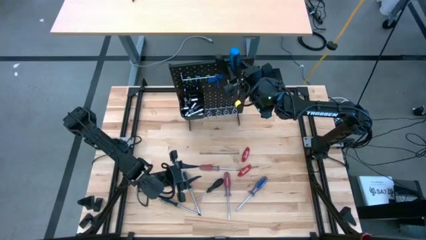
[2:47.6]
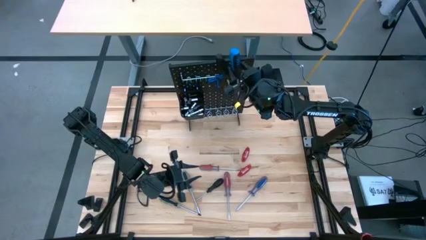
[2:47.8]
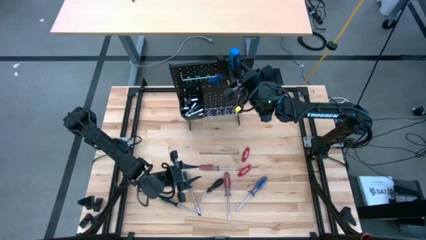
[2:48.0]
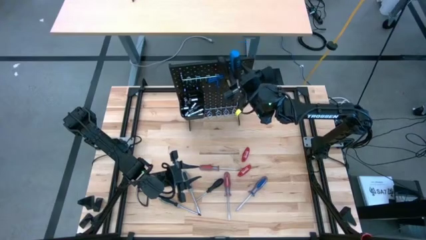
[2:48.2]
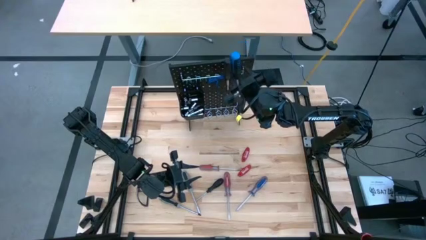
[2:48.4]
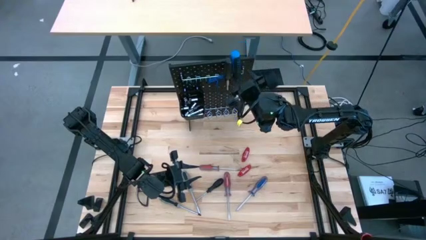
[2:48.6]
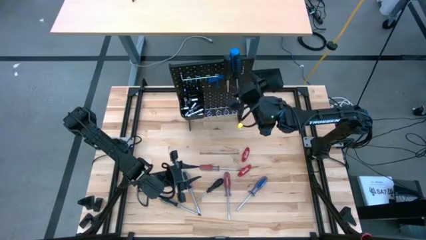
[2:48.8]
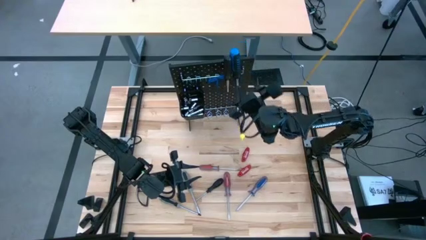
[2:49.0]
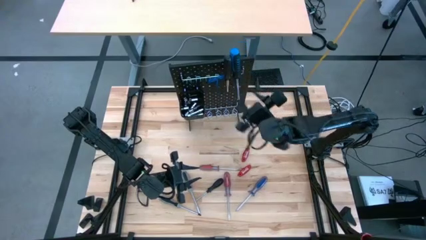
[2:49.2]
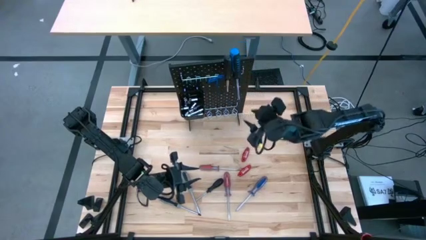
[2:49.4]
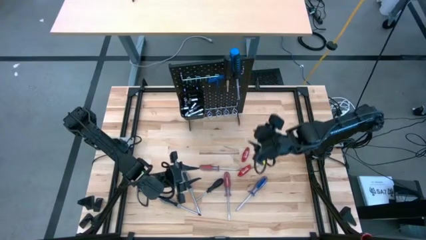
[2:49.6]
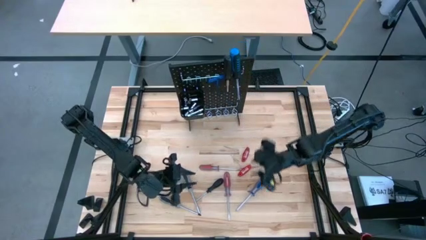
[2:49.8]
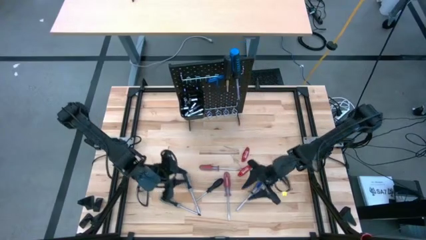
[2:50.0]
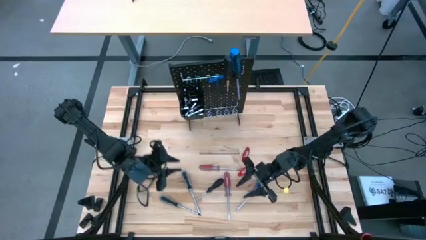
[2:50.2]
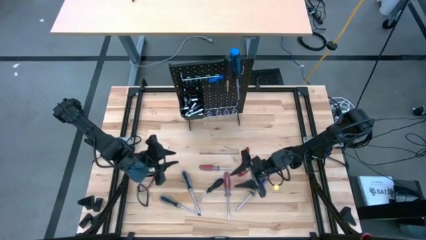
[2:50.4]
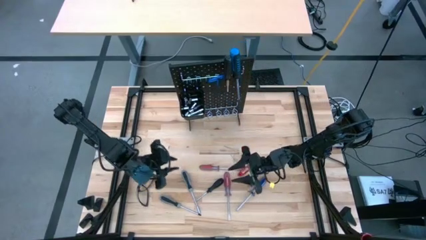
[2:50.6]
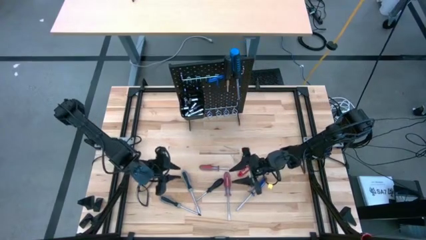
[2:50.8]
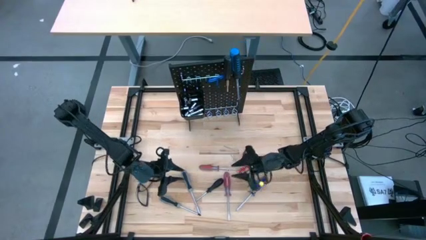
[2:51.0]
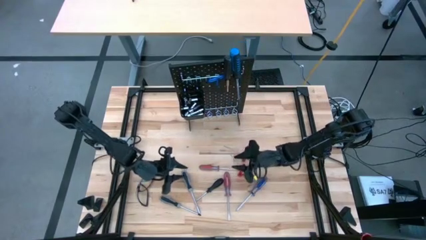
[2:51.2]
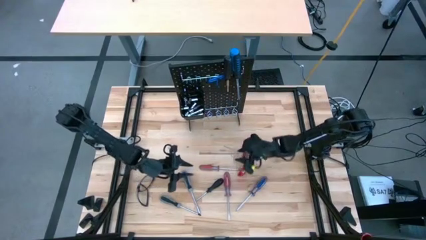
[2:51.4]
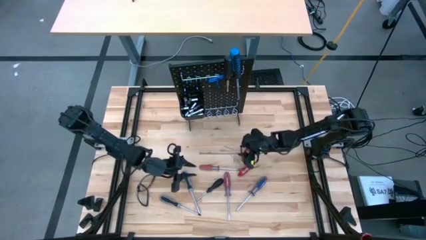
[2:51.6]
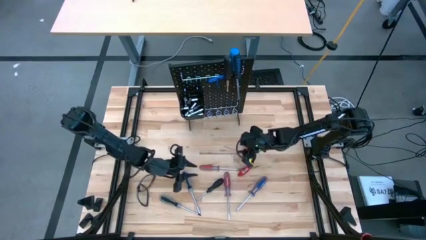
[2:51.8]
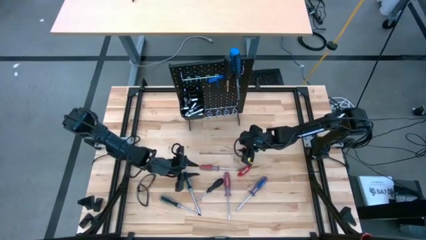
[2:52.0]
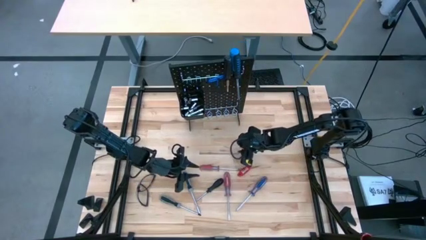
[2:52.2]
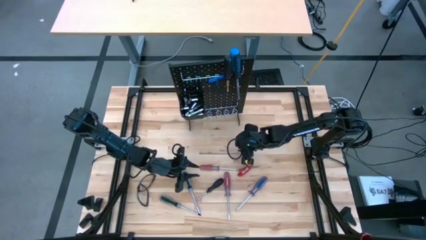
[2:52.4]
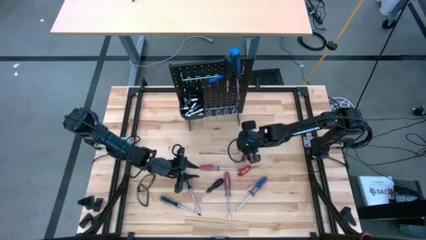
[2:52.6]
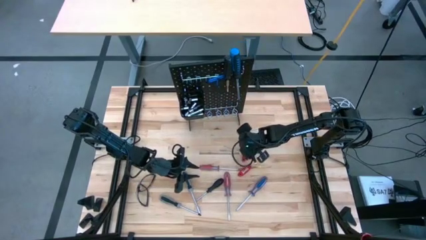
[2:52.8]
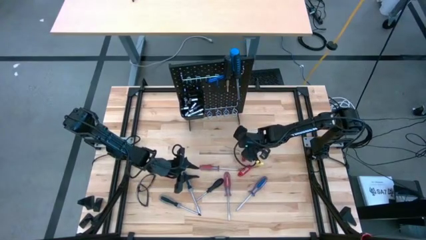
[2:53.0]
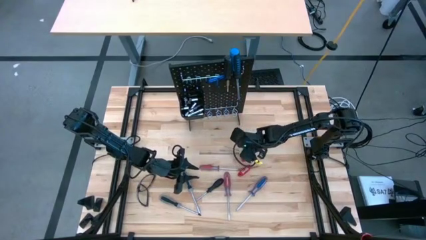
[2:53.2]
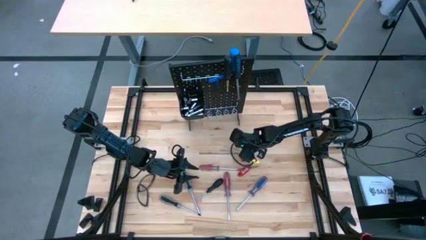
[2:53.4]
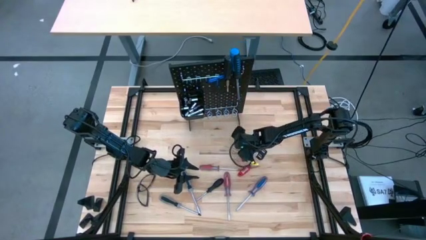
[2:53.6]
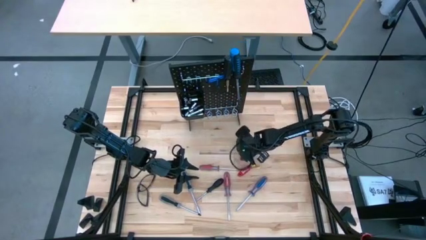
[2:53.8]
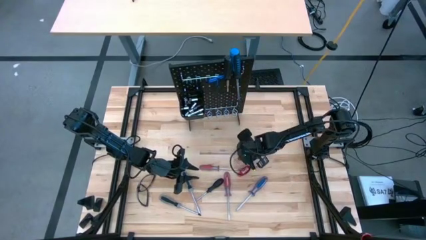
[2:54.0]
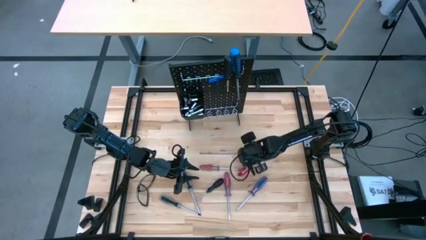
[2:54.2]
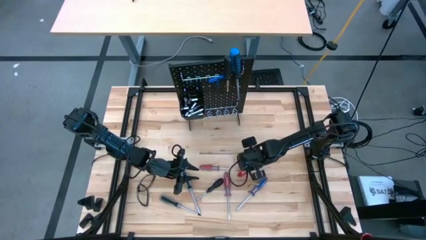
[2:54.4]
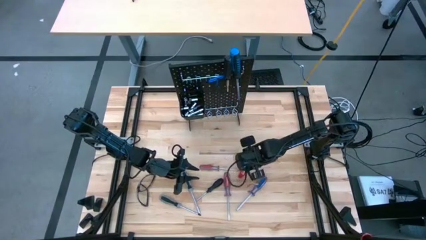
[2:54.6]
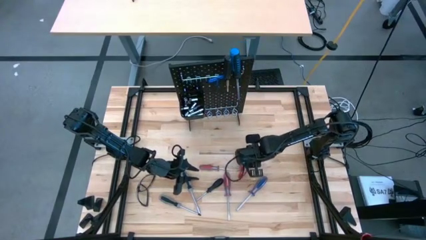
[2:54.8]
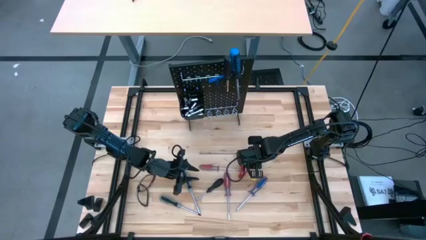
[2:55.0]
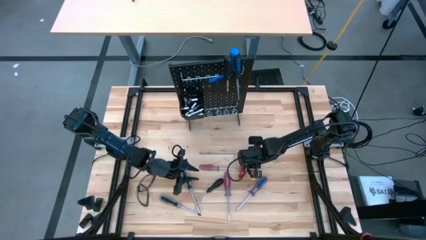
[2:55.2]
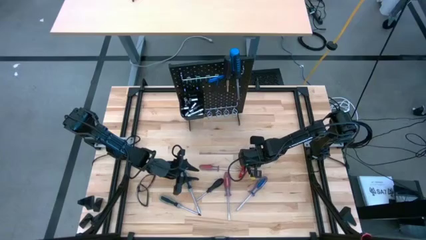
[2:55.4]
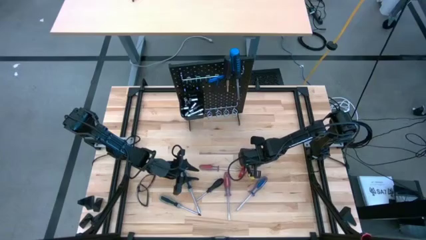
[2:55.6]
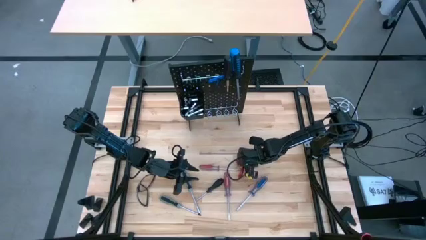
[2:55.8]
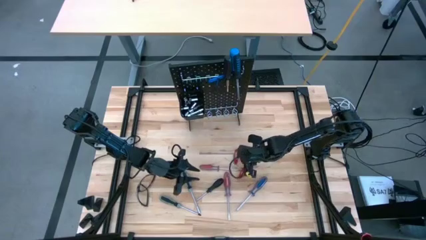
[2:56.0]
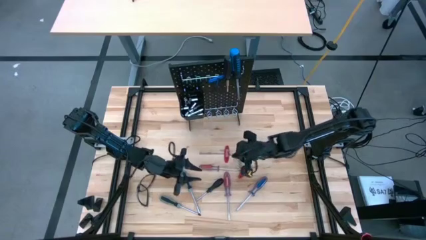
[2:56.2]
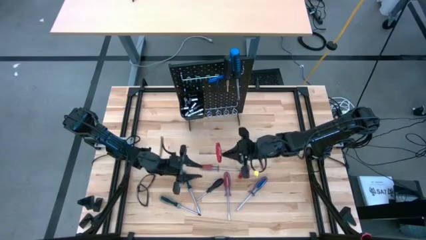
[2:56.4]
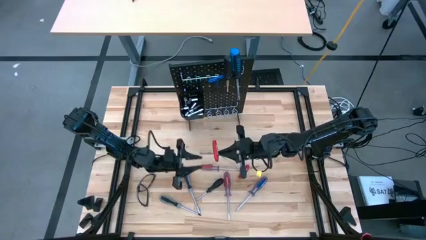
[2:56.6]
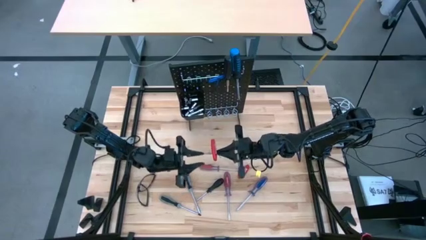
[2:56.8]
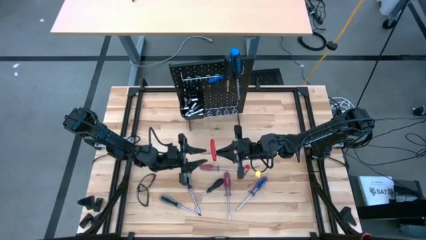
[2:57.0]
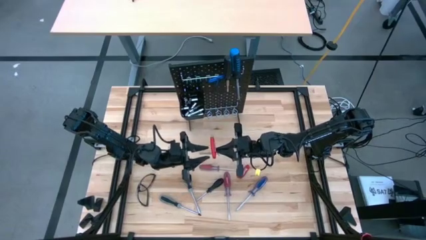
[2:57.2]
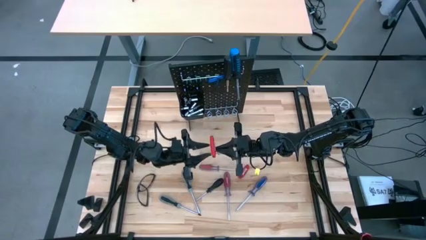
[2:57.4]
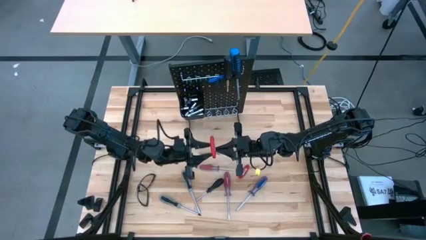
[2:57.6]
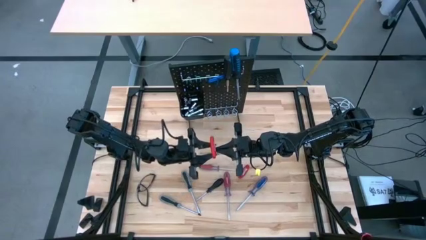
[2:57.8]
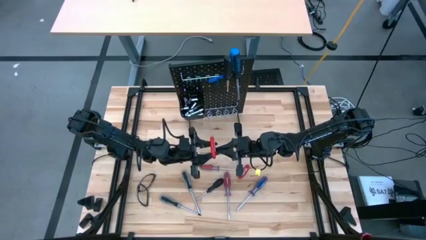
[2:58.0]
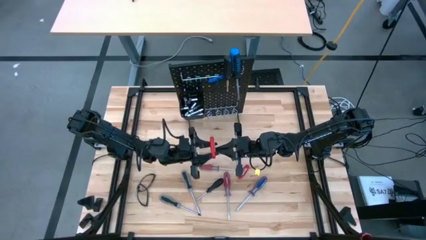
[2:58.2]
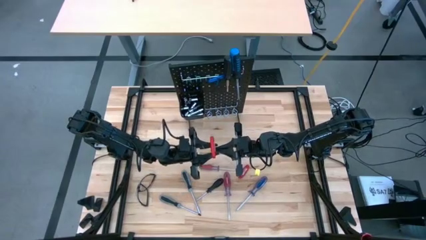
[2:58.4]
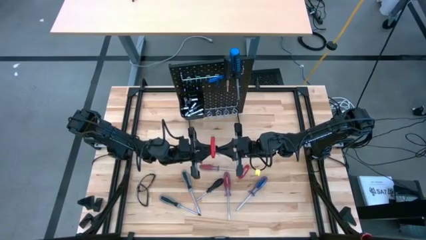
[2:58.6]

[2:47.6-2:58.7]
Task: Hang tools onto peg board
Hang the red allen wrench on the pegboard

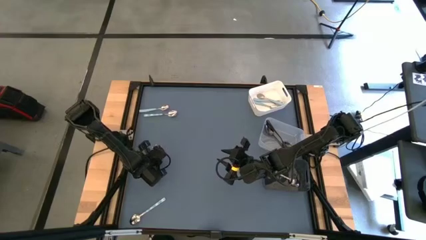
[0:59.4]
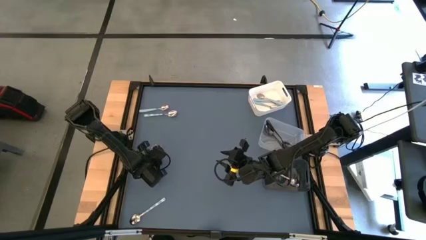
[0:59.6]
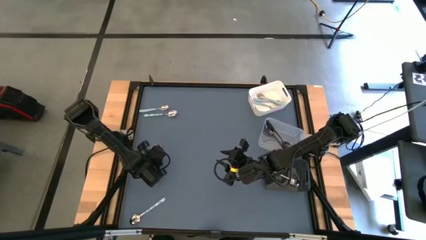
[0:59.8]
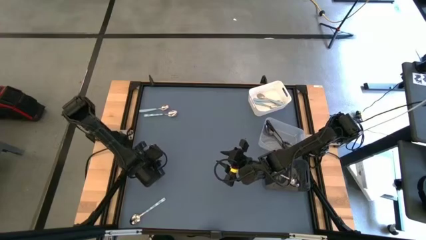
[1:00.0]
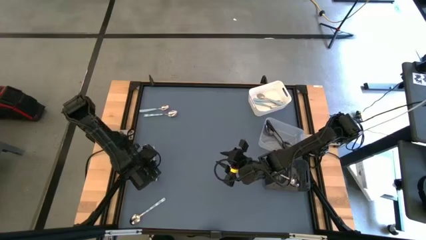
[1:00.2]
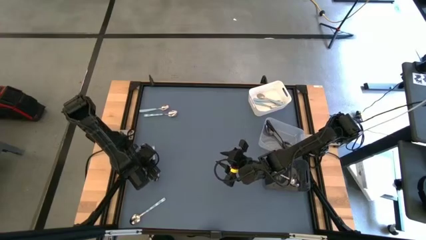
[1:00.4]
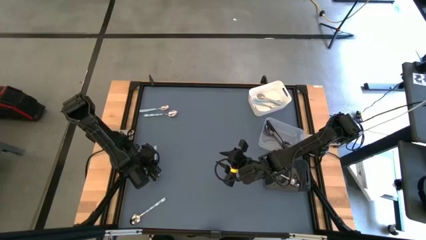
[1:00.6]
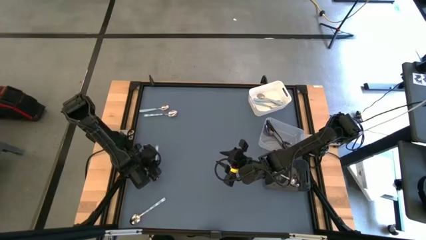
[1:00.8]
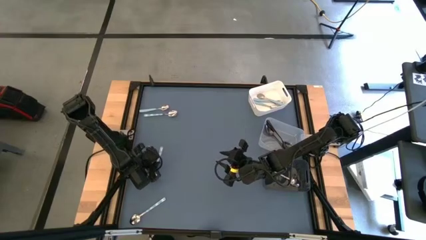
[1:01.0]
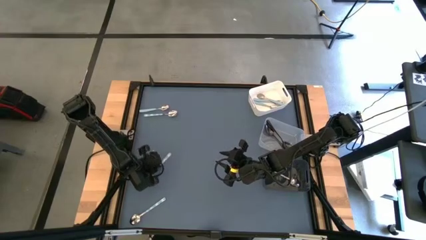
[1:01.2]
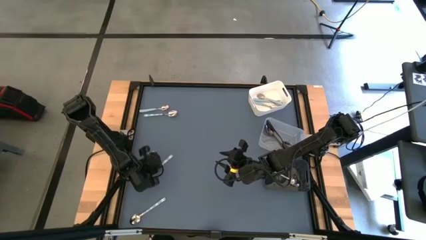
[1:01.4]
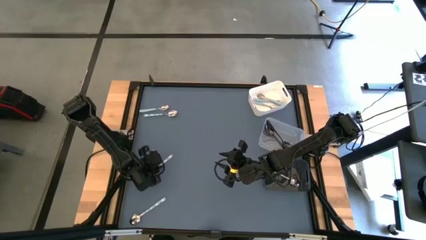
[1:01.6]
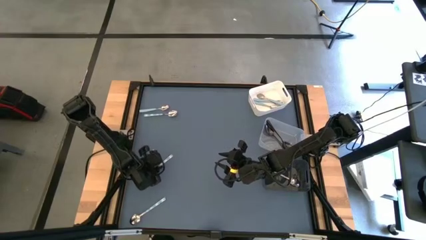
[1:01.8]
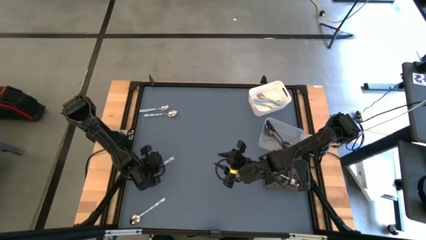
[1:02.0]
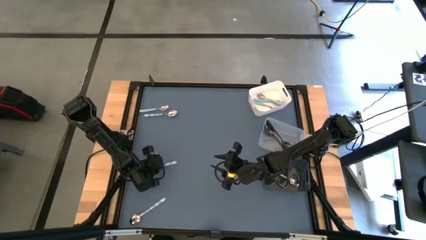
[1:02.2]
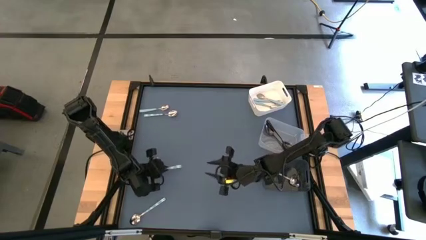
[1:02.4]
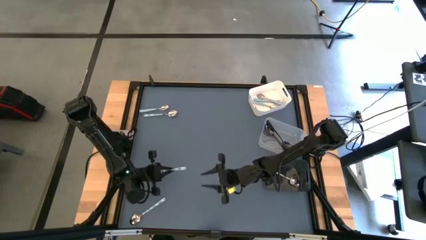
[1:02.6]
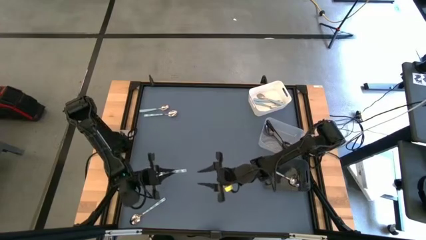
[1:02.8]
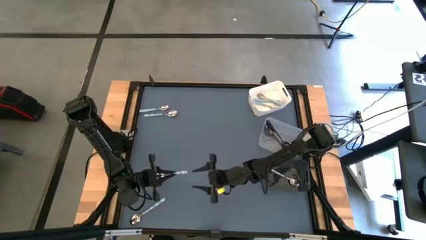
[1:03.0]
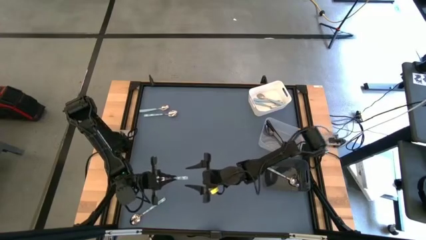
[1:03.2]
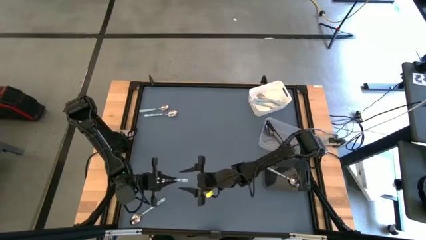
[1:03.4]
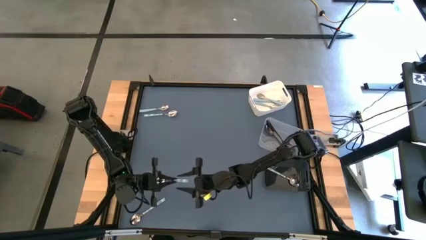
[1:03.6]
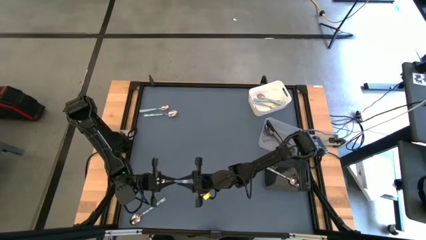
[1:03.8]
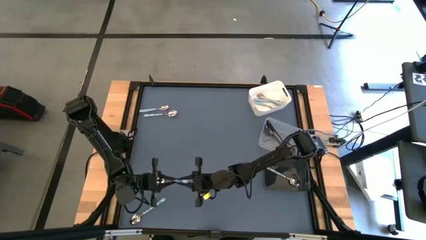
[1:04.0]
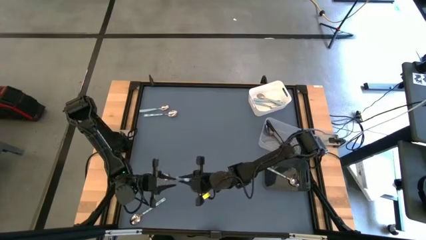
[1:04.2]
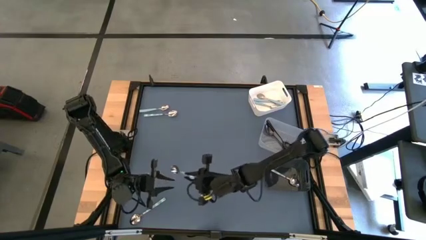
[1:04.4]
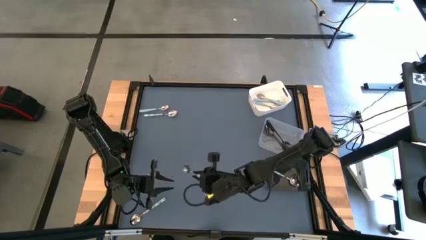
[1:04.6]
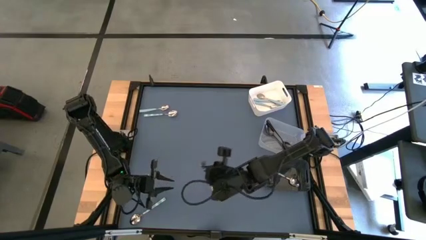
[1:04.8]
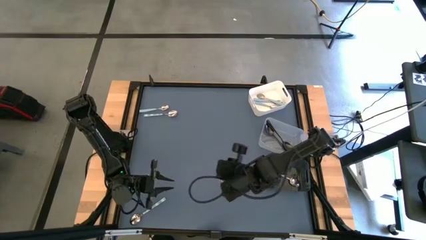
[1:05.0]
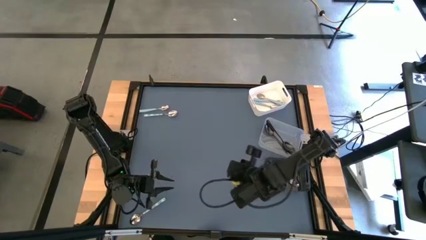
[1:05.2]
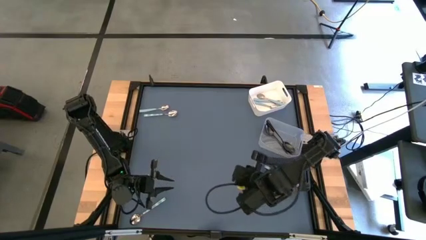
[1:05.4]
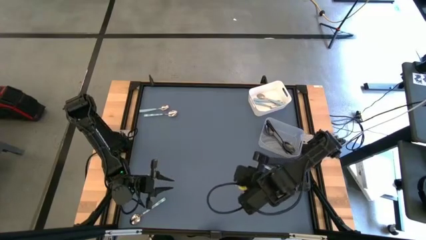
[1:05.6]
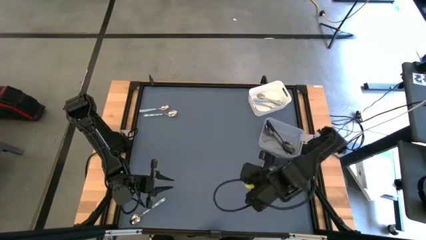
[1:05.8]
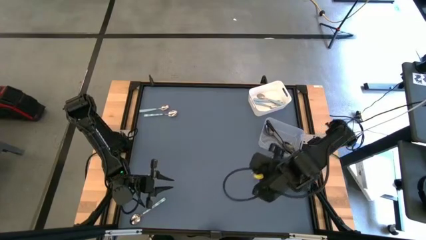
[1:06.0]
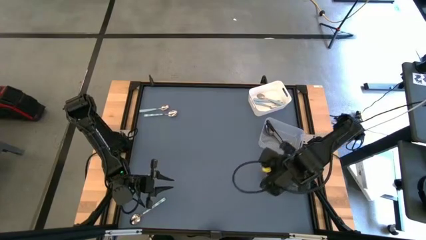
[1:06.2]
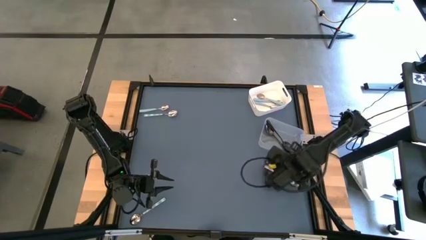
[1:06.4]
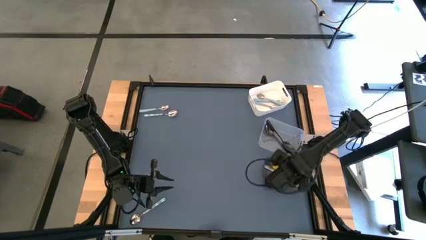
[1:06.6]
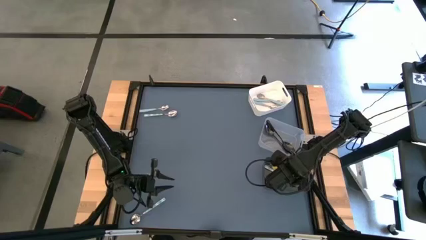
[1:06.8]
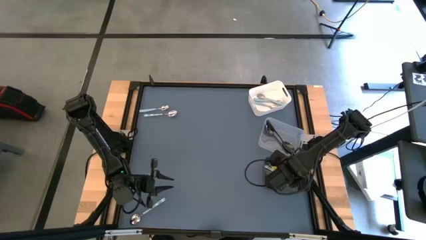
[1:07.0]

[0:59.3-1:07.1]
Task: Sort silverware by color (type)
Put the white and blue spoon into the black bin
